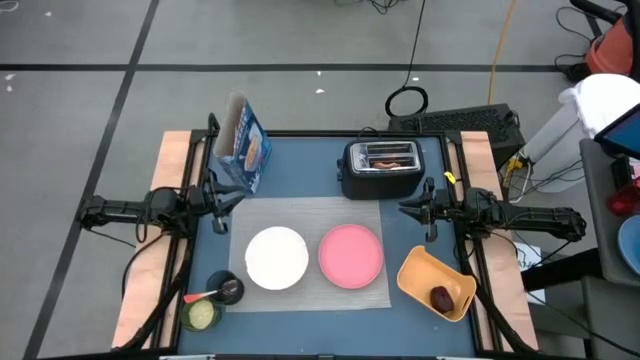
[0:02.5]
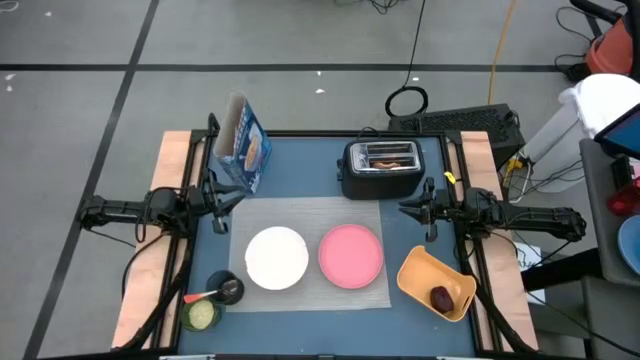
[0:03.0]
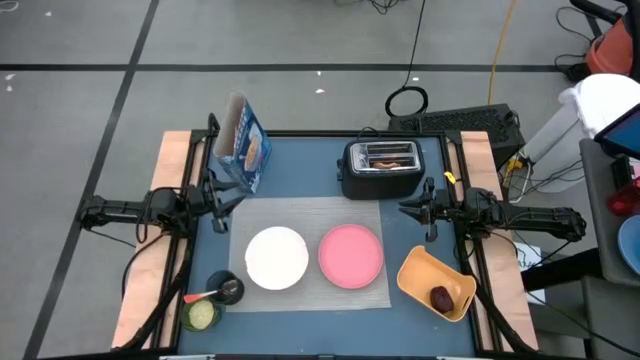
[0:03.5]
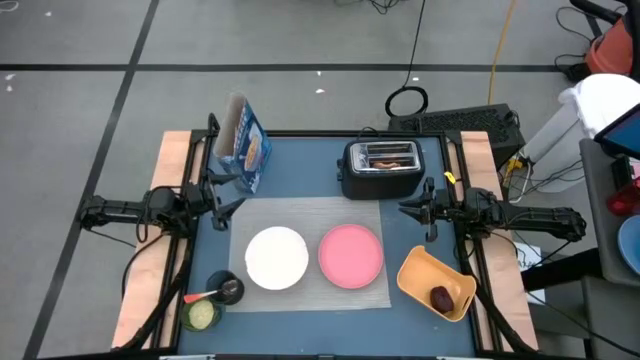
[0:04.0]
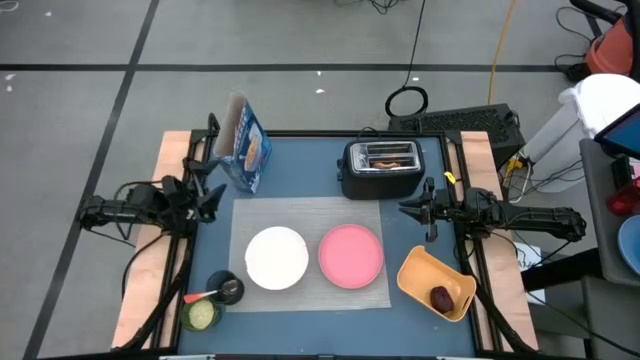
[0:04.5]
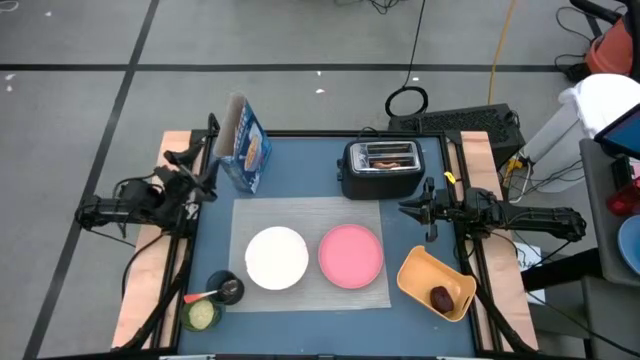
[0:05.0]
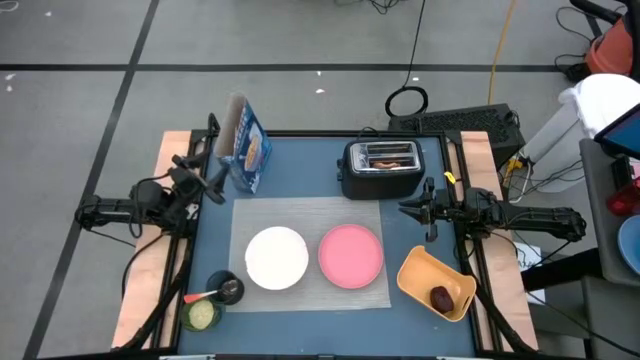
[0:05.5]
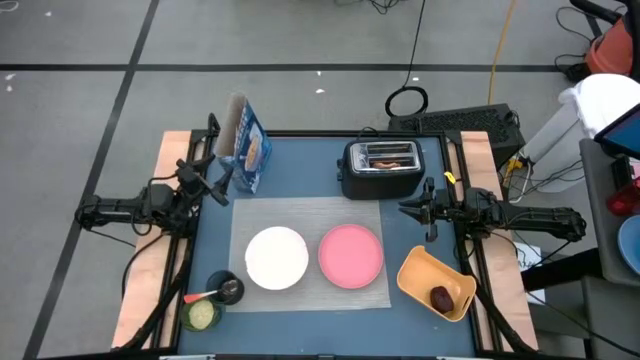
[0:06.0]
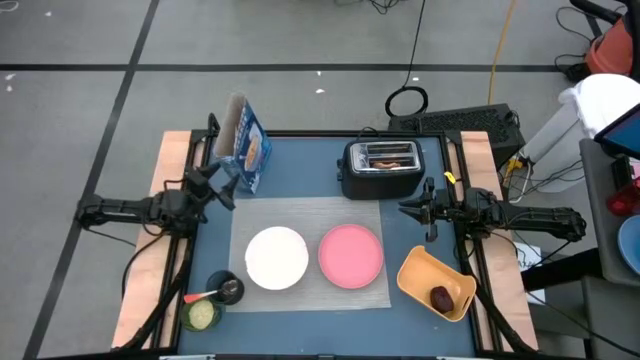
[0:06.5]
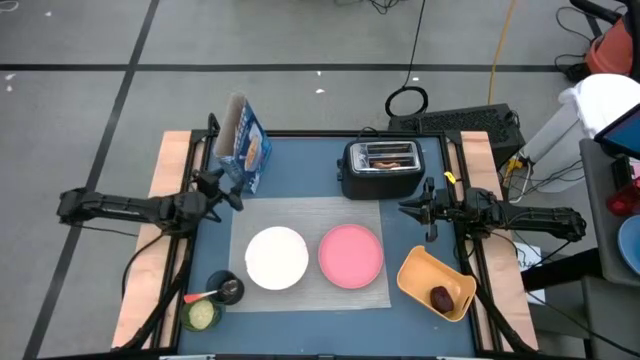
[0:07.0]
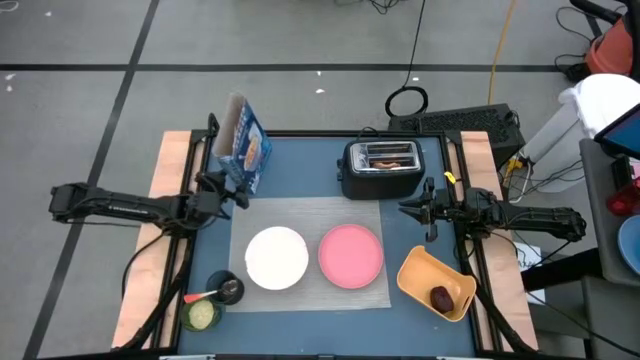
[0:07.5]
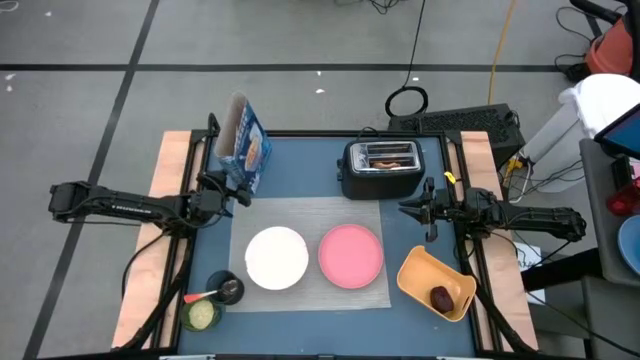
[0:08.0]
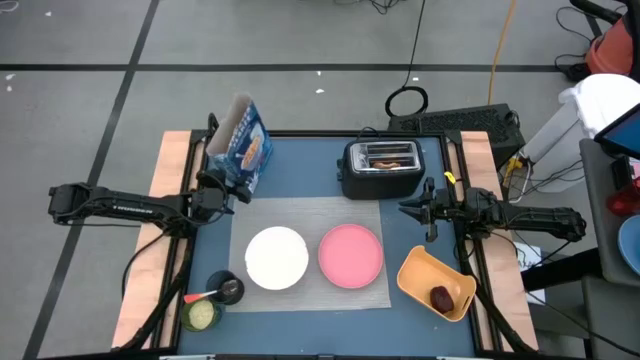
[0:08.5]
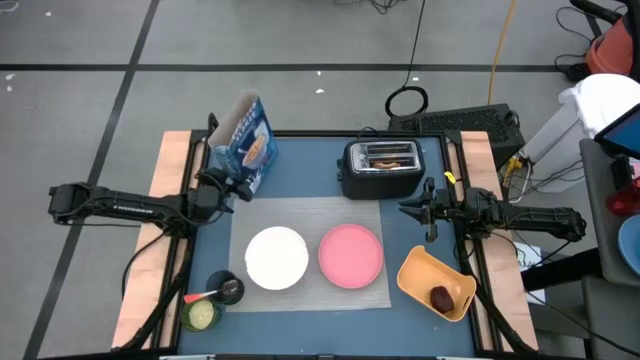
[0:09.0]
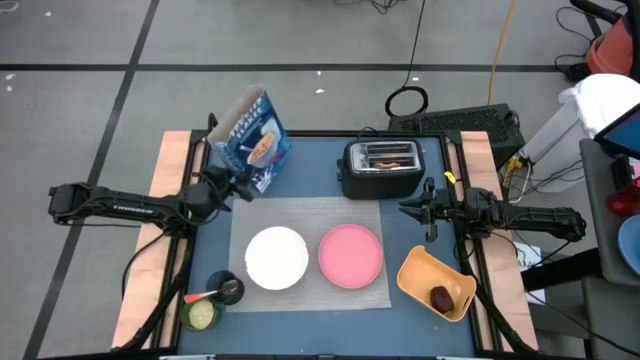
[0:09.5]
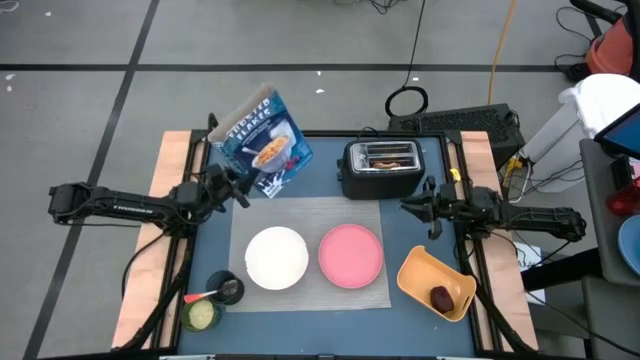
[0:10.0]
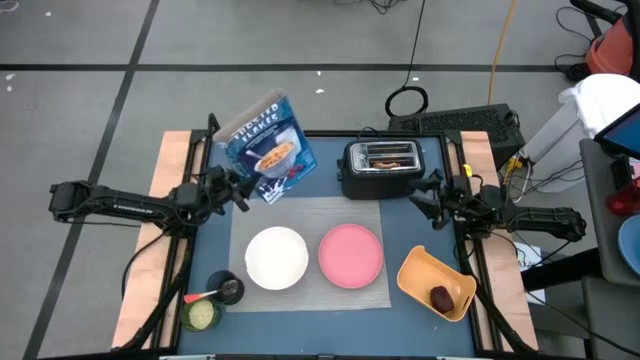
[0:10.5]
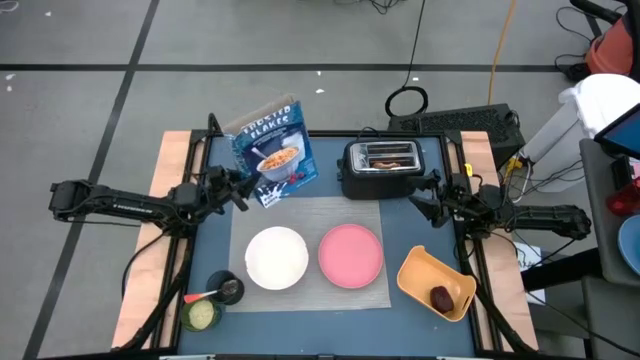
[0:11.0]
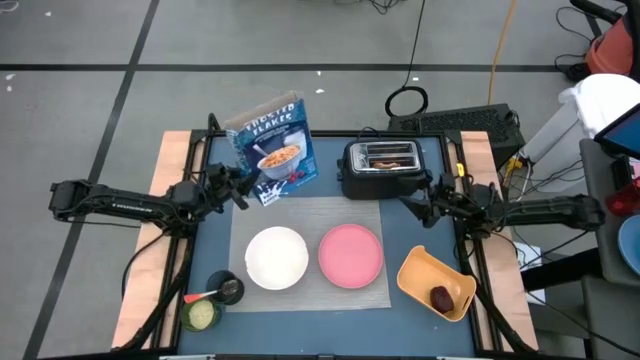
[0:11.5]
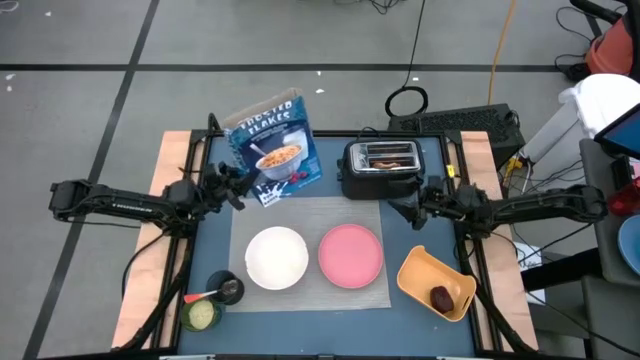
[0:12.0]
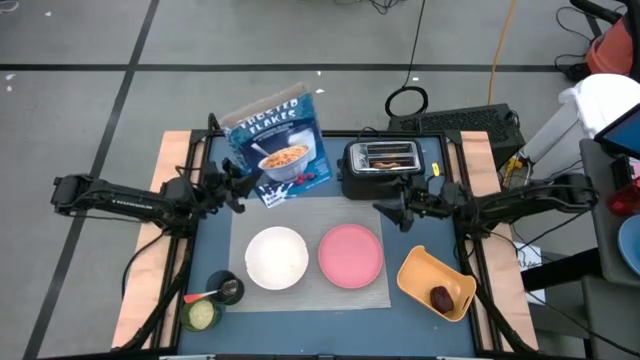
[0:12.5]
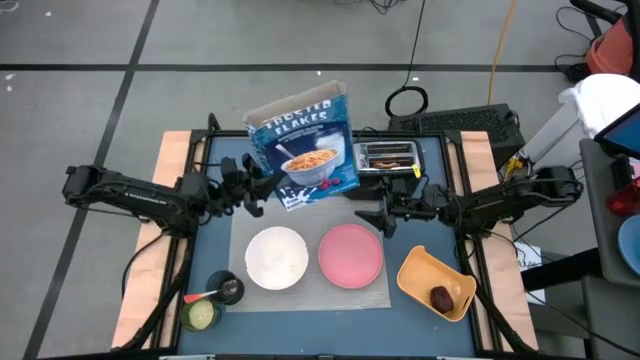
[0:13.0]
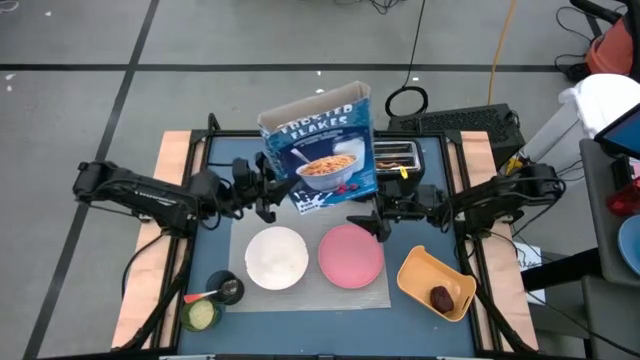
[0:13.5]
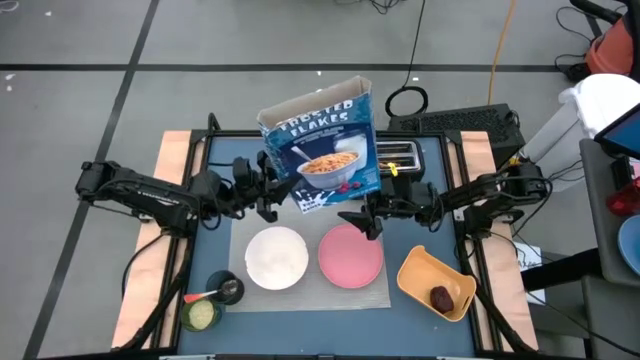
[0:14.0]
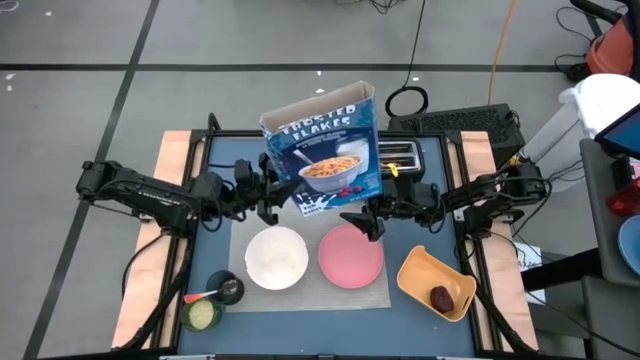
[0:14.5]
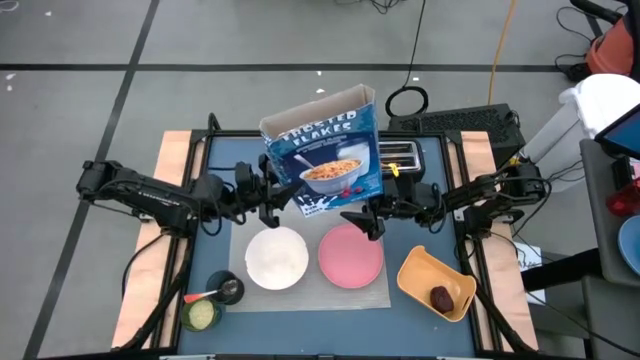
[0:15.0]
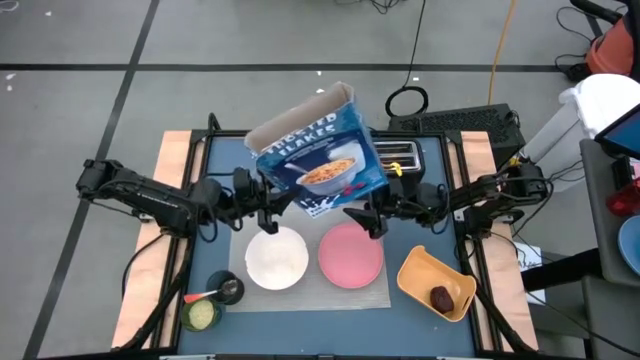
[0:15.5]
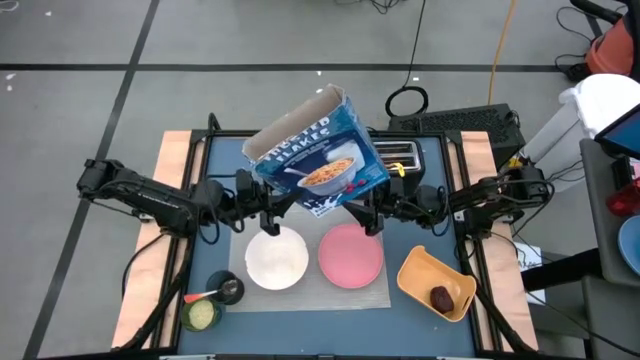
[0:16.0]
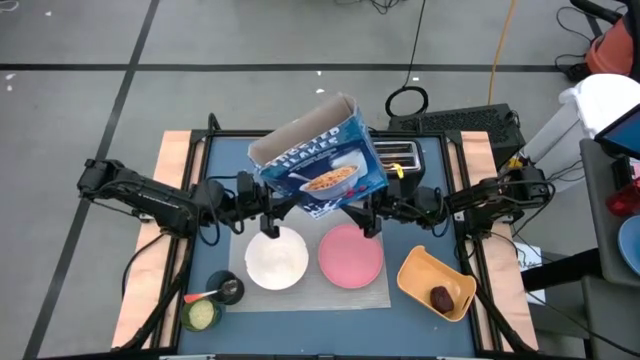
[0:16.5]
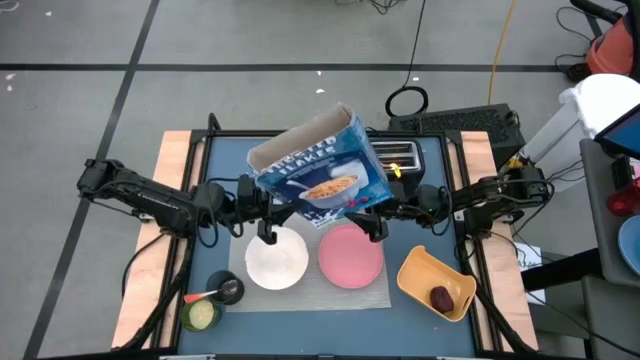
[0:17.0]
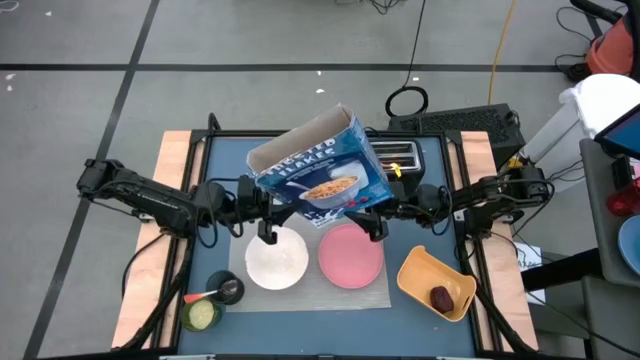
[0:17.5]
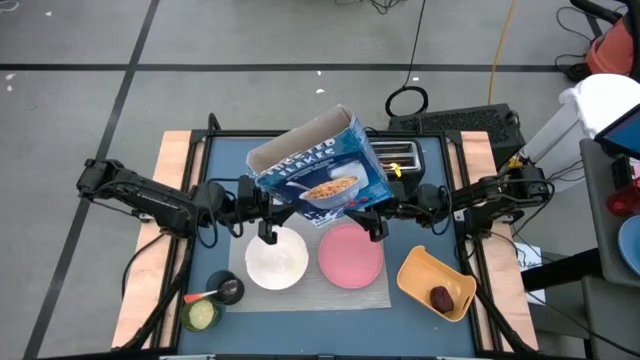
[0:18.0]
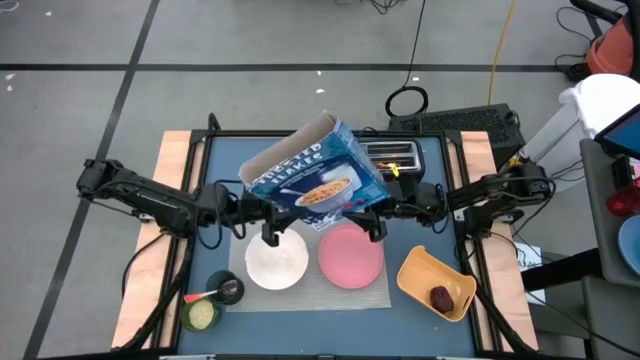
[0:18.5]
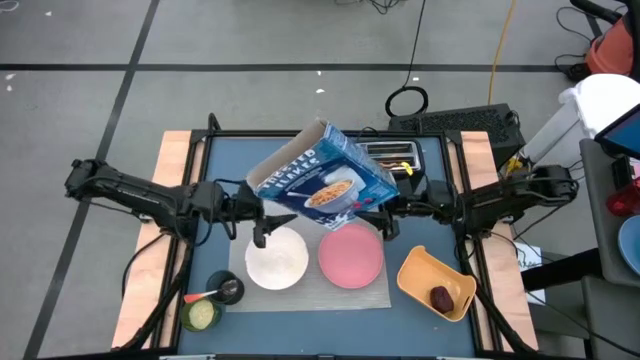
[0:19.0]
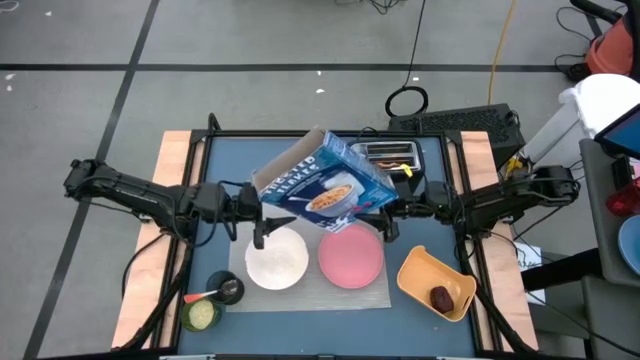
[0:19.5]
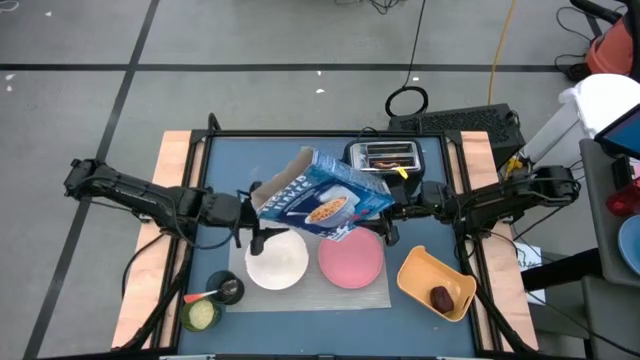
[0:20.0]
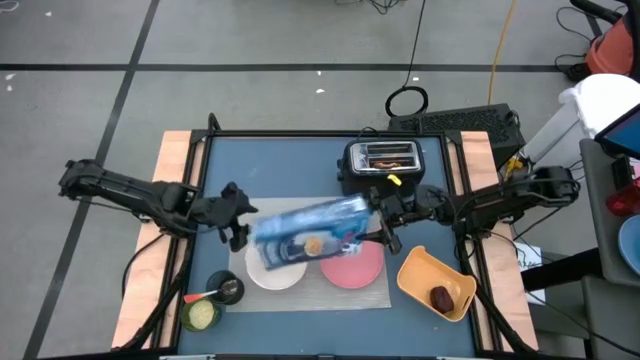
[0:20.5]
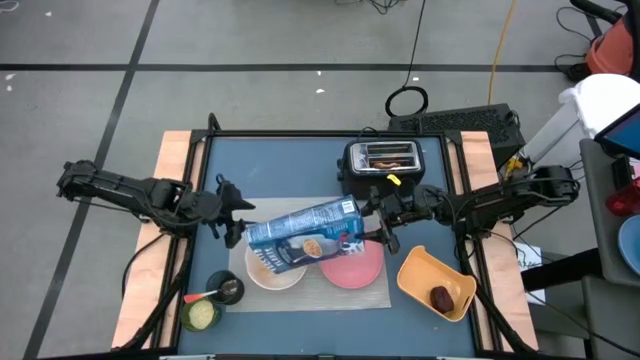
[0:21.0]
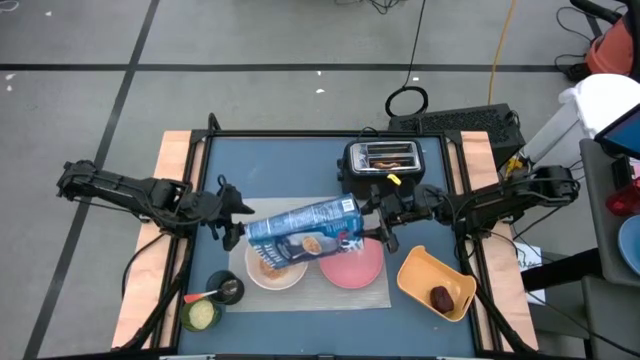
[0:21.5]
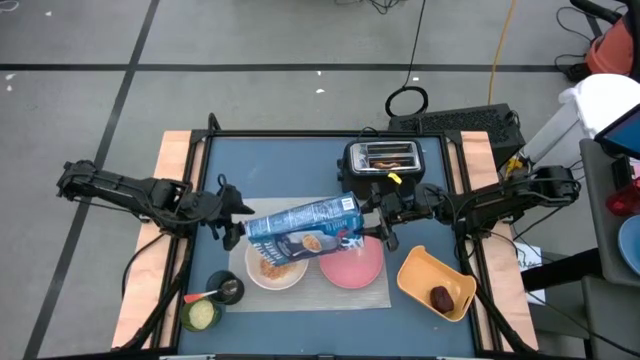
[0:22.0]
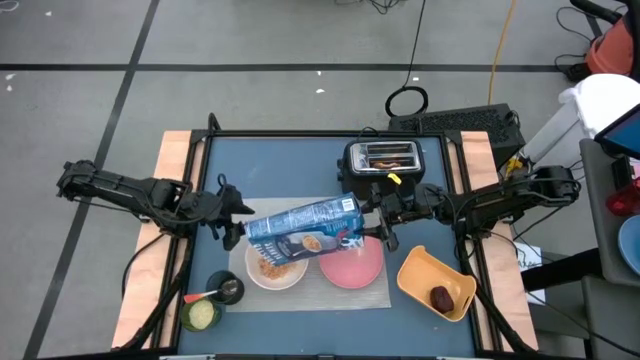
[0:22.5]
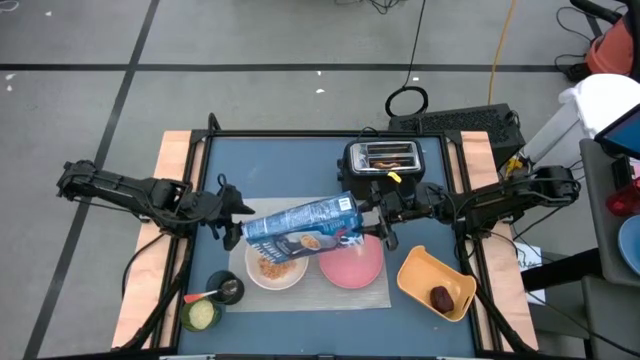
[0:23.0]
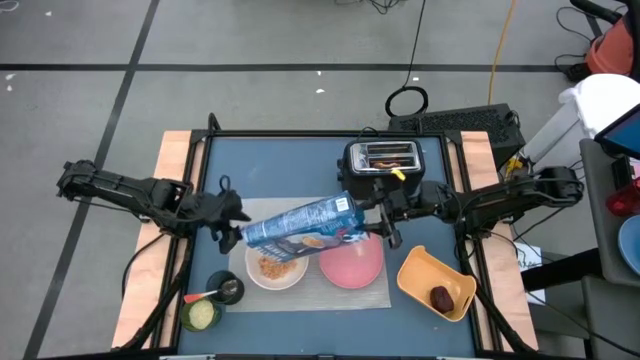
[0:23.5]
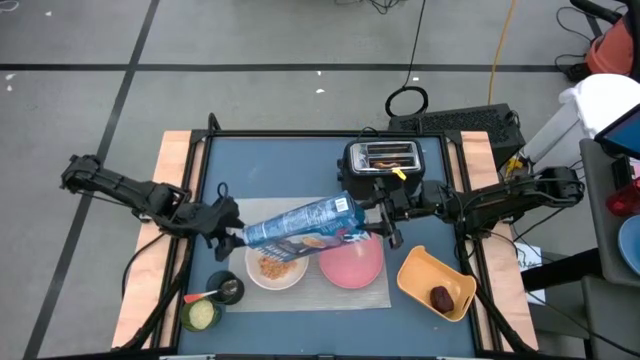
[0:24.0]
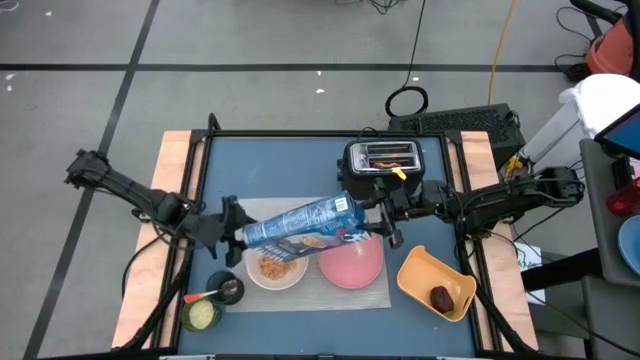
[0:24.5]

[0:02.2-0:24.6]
Task: Arrange a breakfast setting
Pour the cereal into the white bowl
